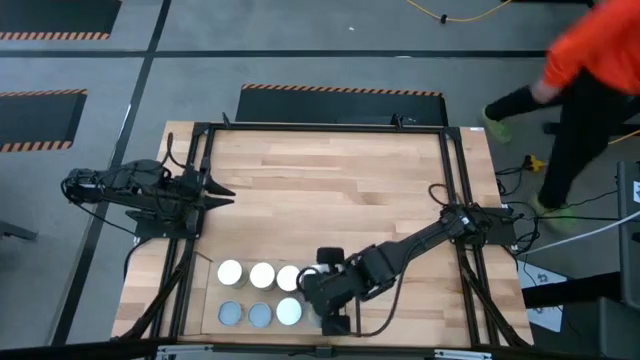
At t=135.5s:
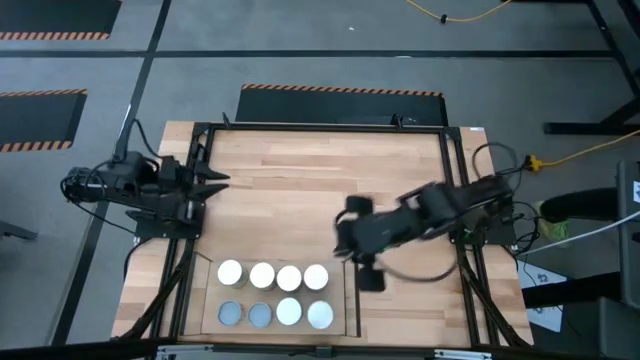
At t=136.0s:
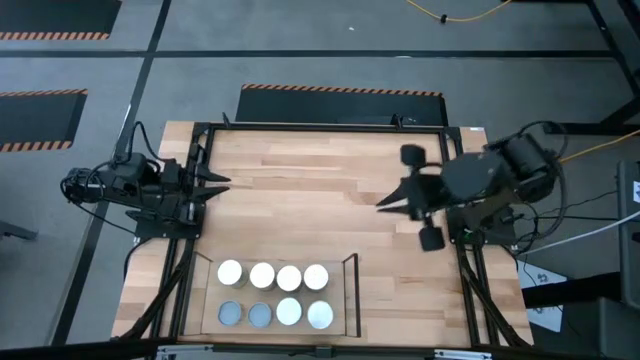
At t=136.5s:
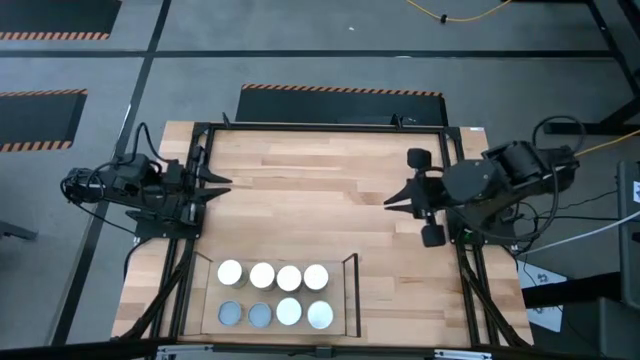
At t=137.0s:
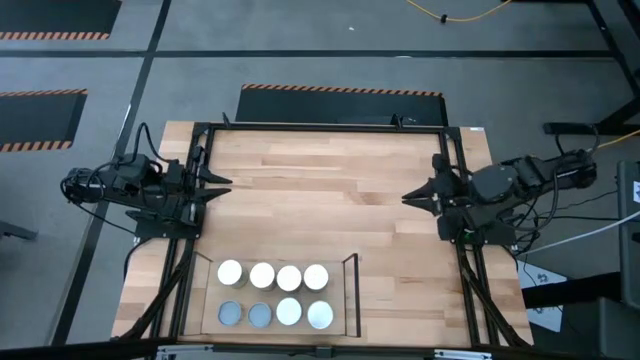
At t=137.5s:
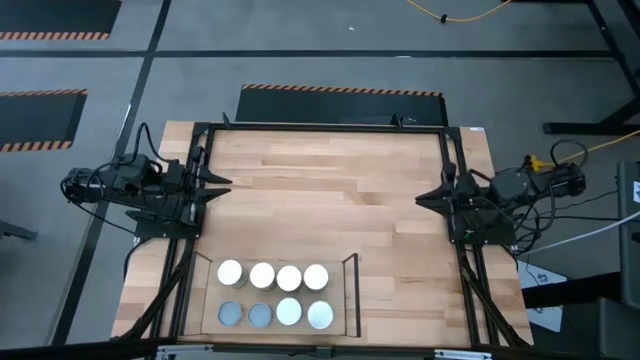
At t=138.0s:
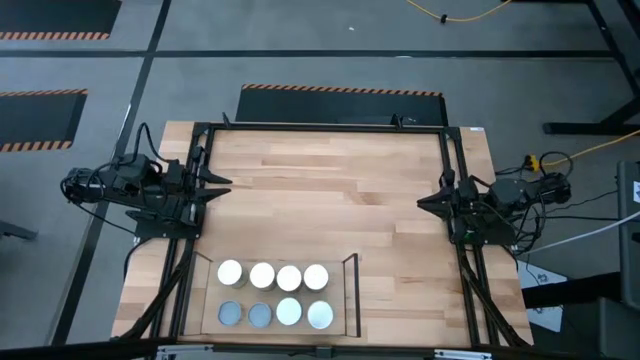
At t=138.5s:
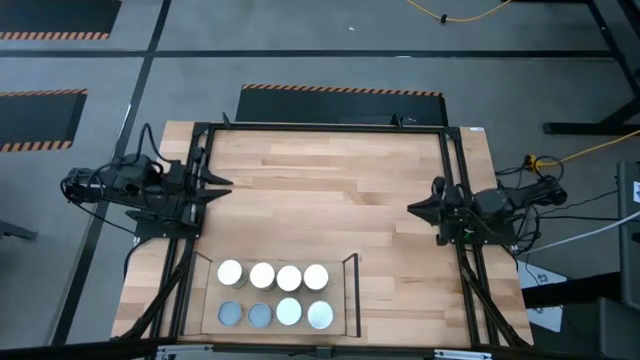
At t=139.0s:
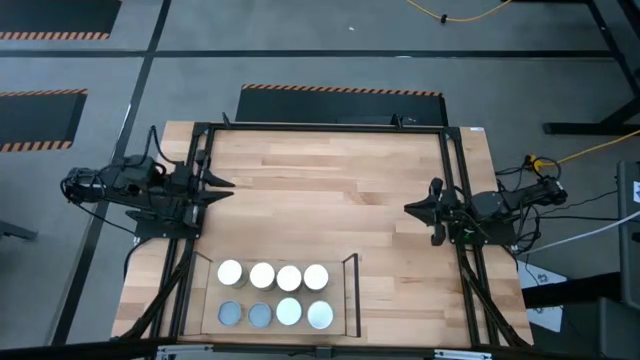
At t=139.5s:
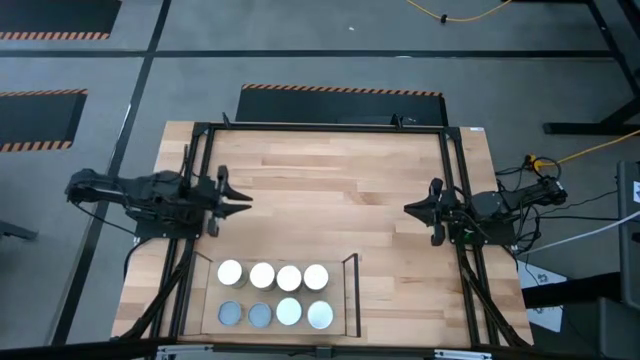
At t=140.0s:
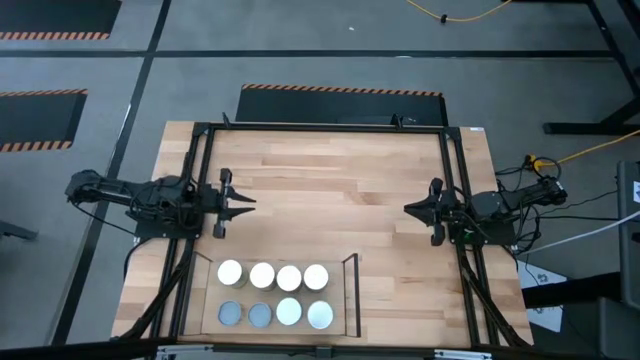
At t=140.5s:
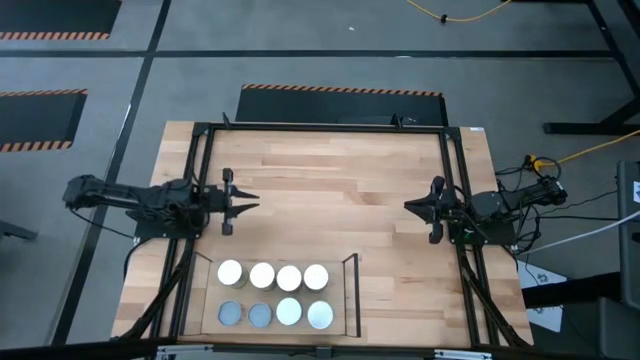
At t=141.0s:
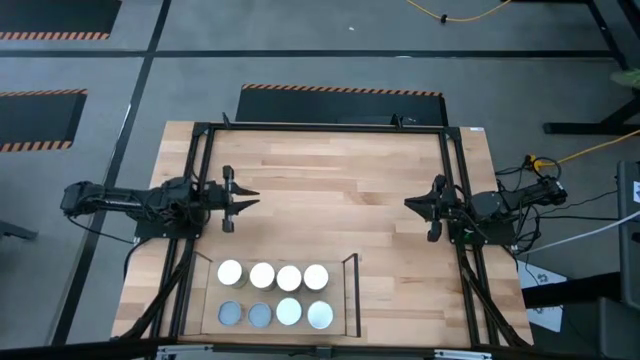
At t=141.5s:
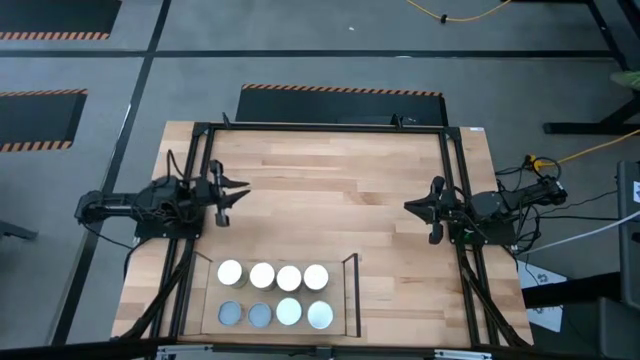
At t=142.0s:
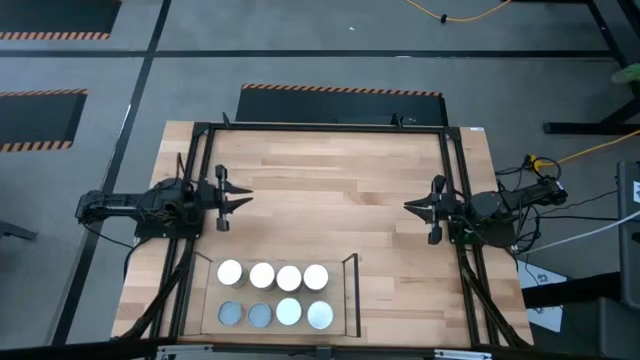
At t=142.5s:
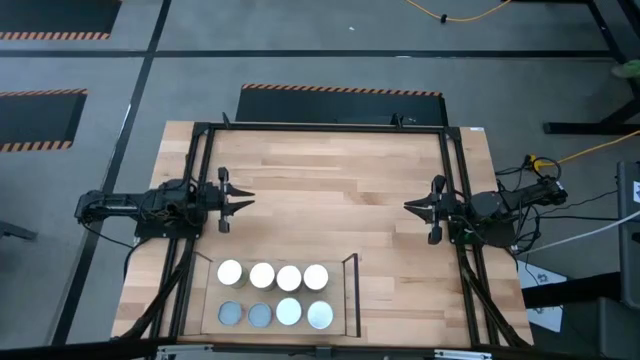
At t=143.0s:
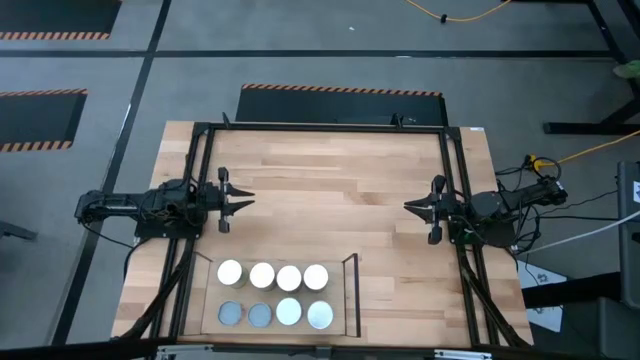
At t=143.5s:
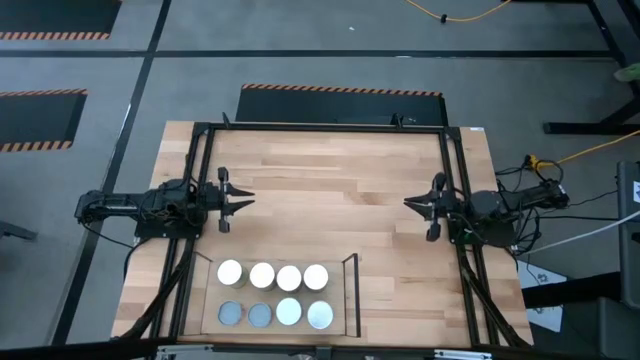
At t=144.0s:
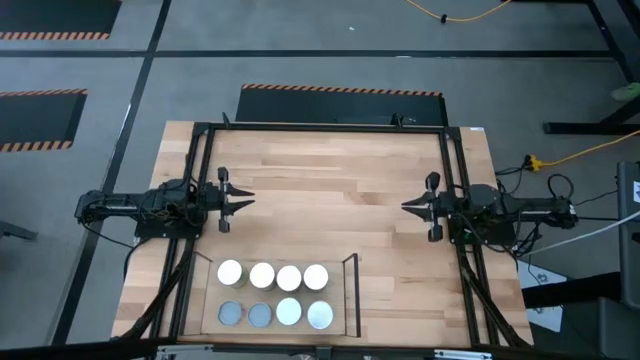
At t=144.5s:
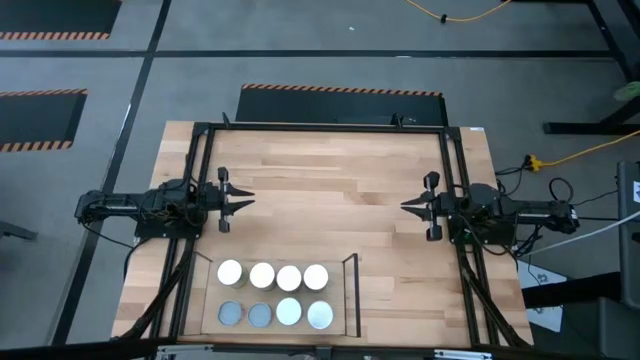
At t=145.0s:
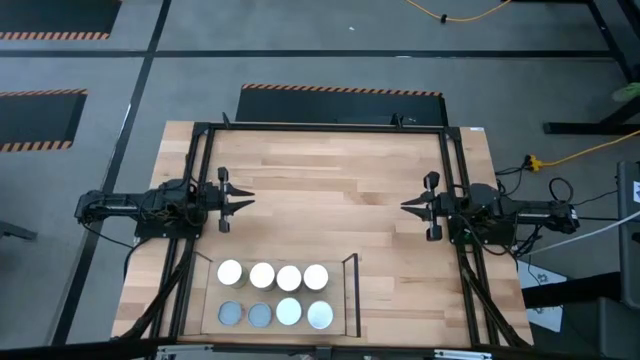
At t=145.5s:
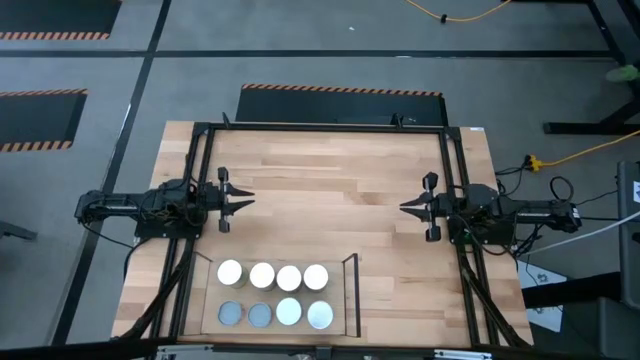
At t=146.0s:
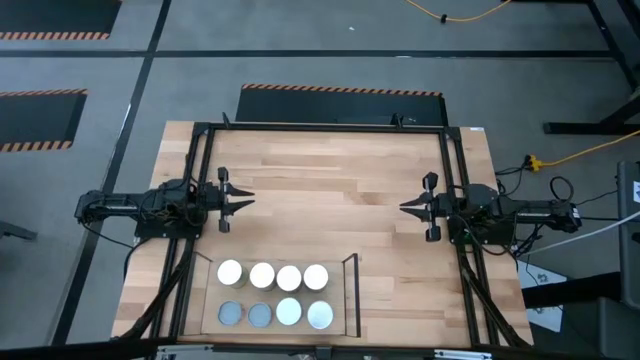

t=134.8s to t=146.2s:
Task: Pick and place cans onto a shelf
Return to Home Position

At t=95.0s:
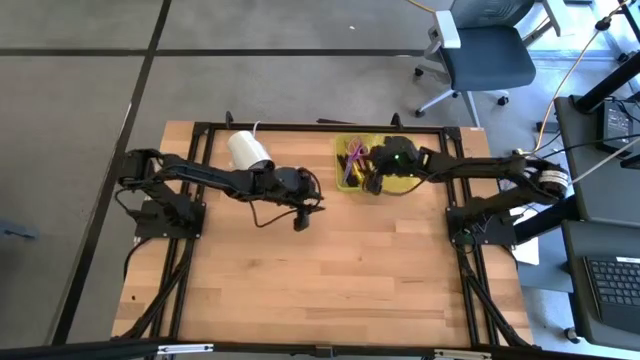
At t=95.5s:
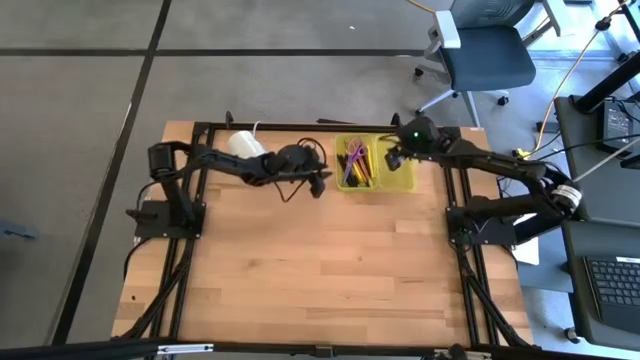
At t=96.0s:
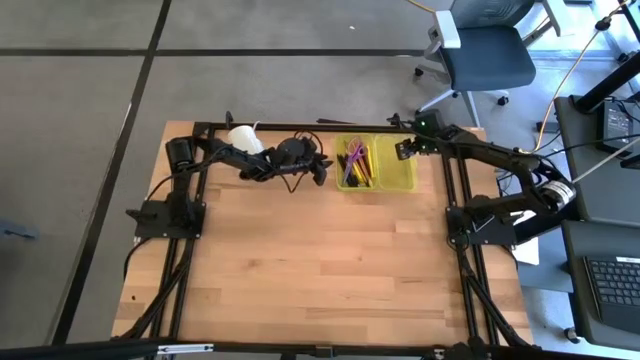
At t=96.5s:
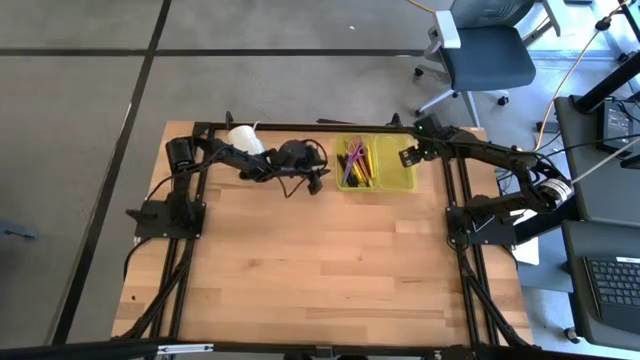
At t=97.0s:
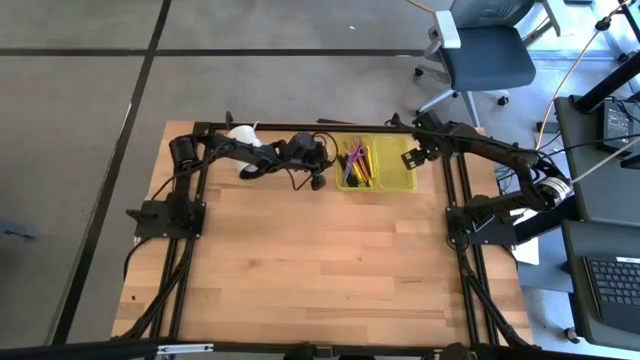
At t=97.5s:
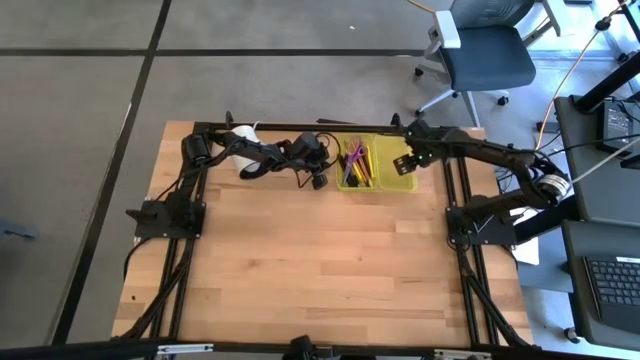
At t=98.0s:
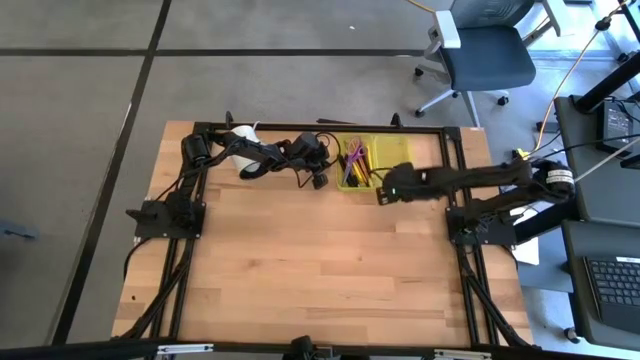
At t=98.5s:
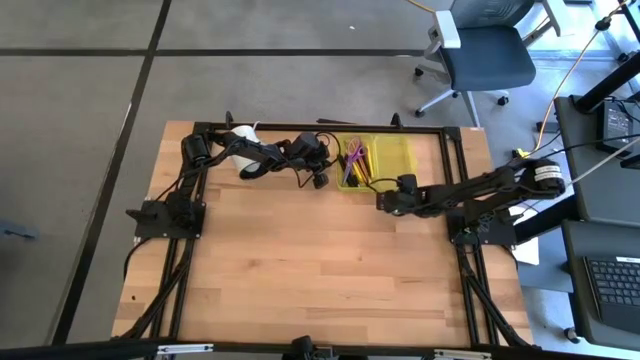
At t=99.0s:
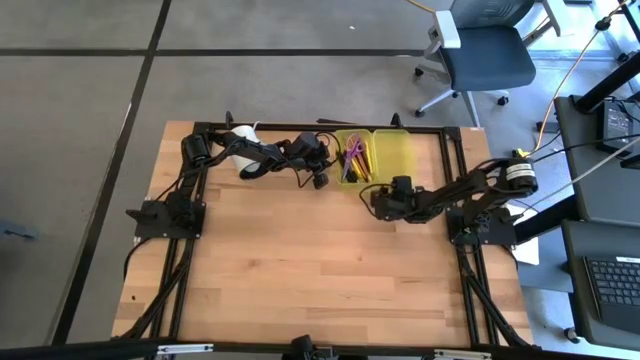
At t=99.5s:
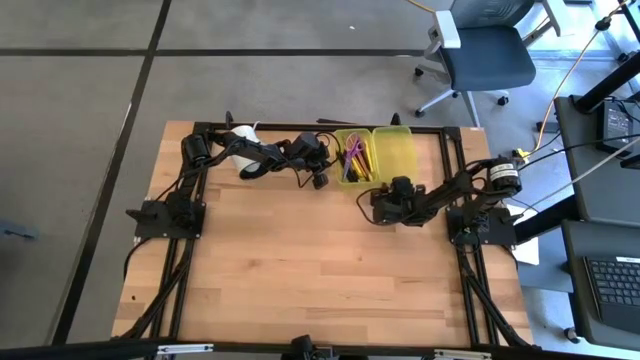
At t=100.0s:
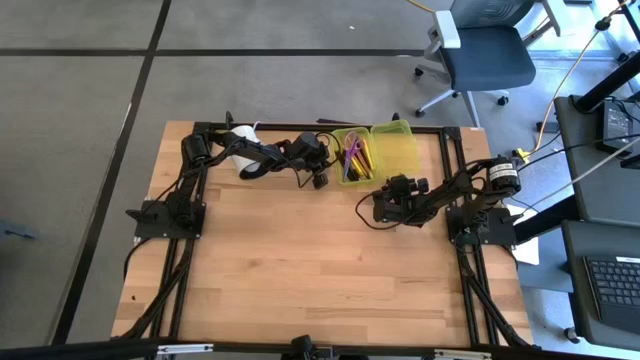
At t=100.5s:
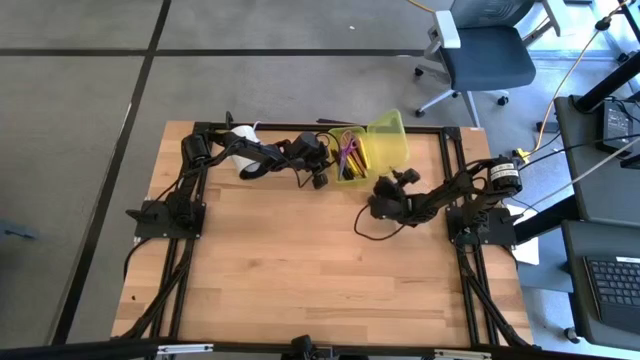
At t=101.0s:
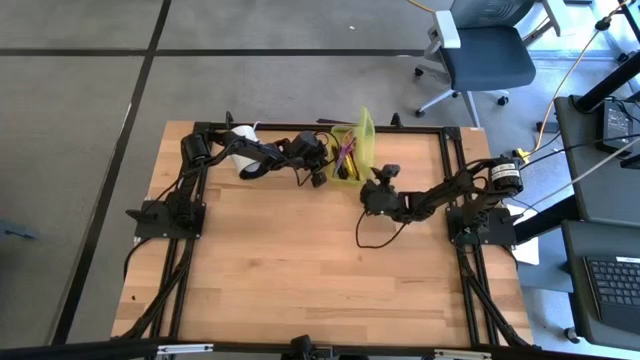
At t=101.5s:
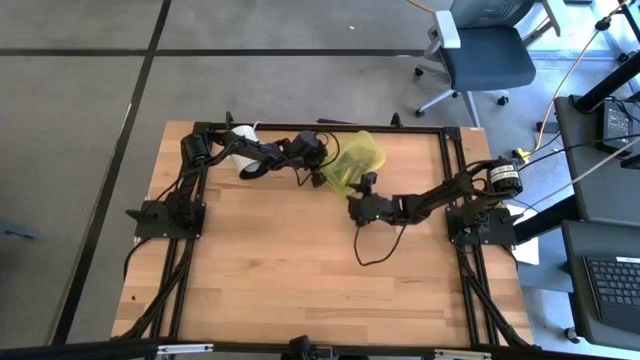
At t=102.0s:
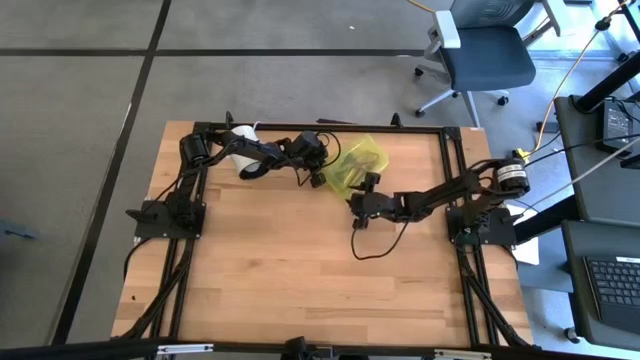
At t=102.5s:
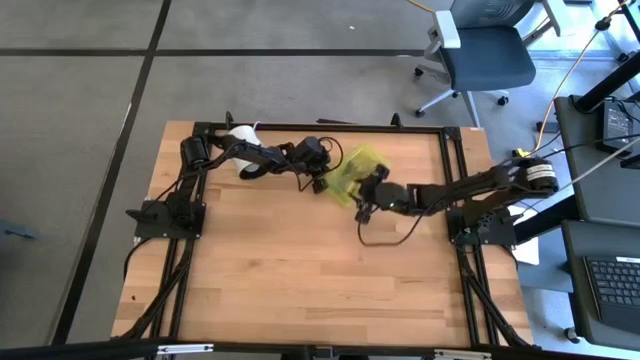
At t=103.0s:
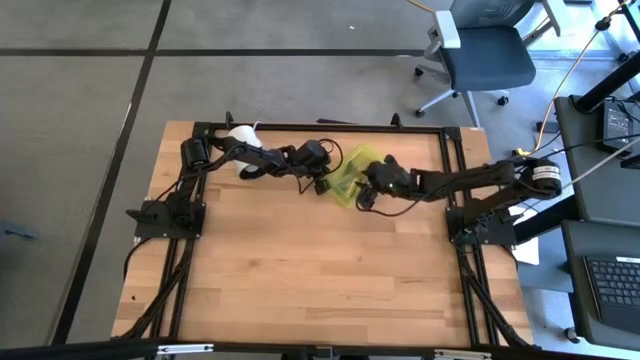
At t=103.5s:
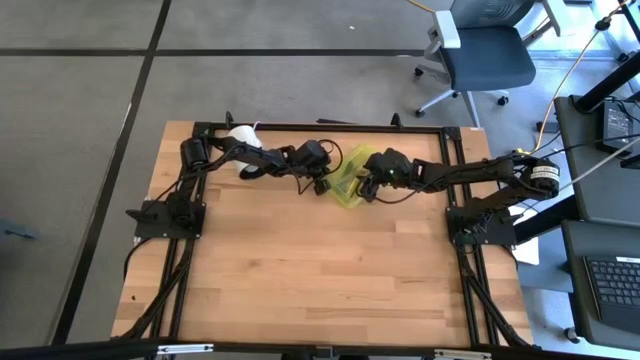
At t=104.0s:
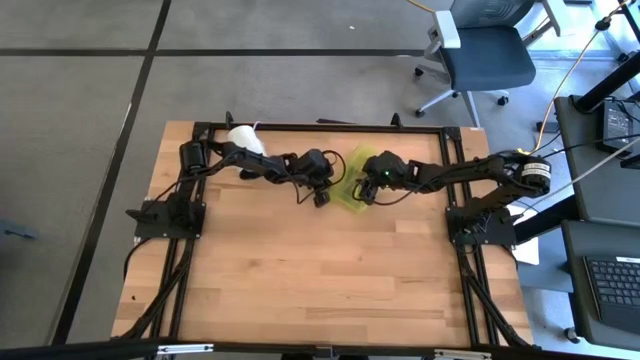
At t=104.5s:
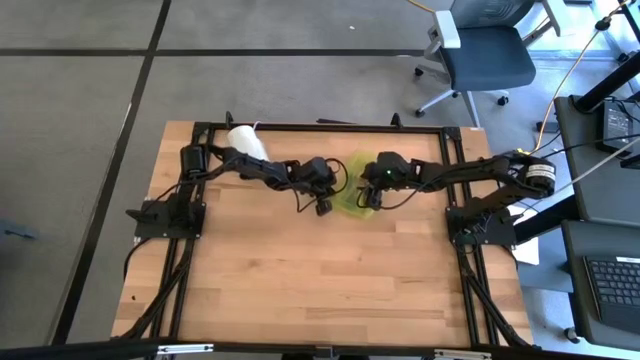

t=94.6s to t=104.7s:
Task: Pick & place school supplies into a supply box
Close the yellow supply box
